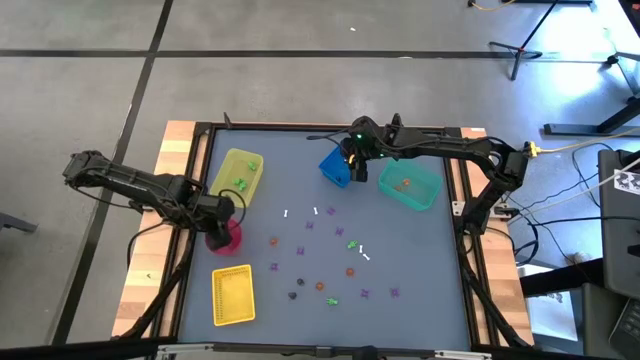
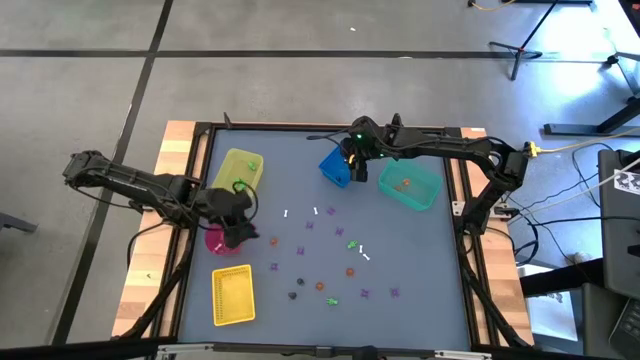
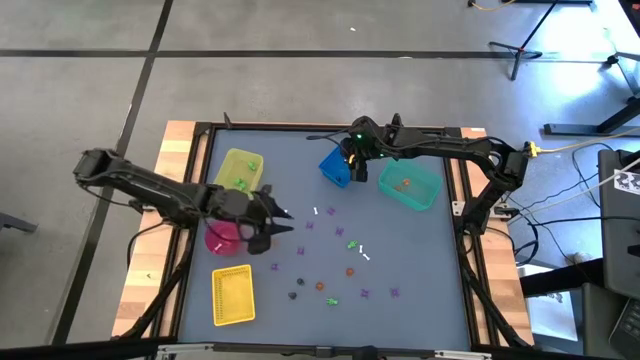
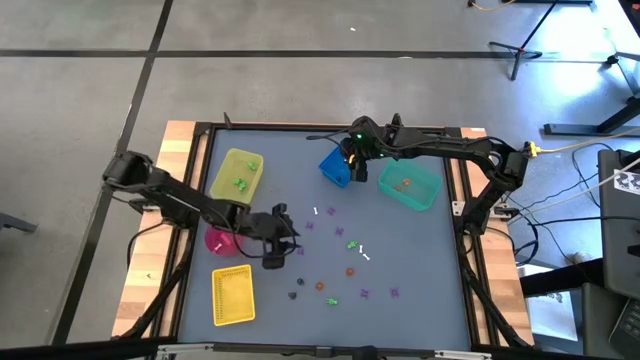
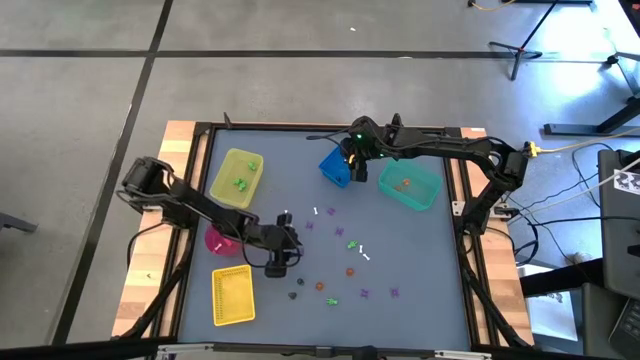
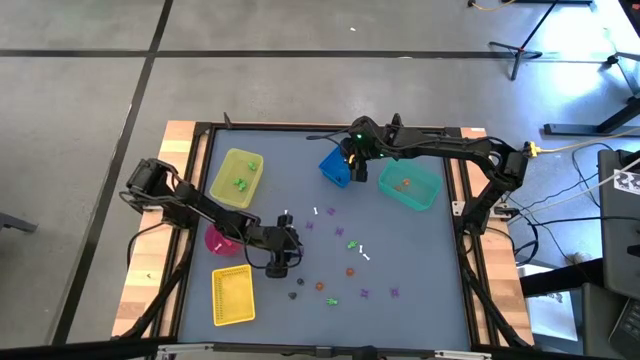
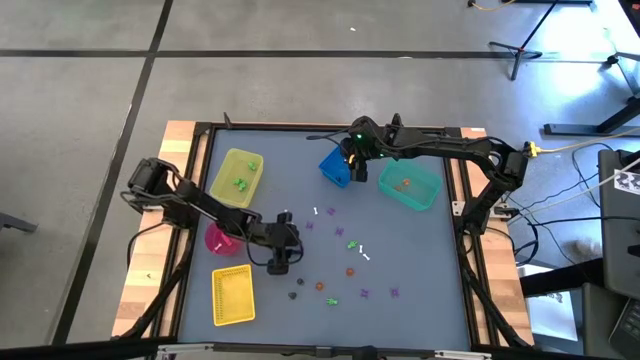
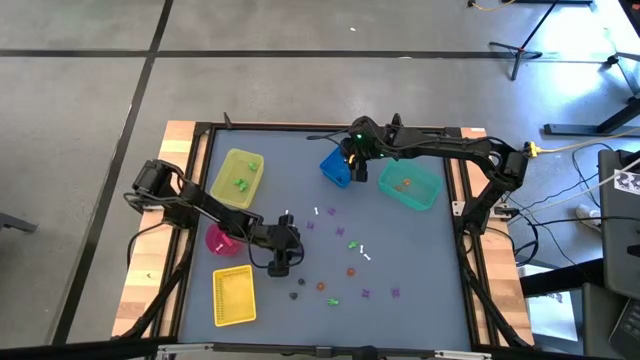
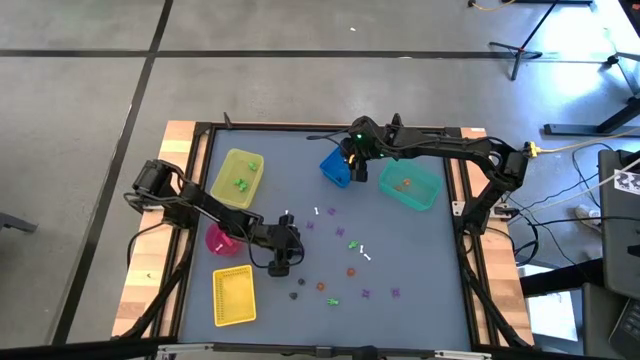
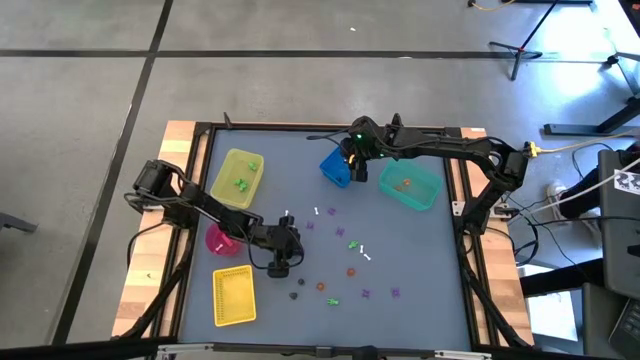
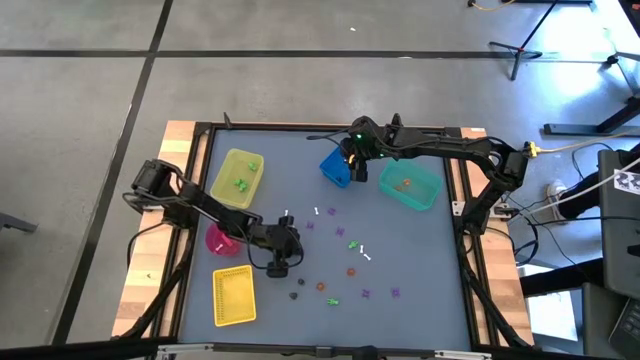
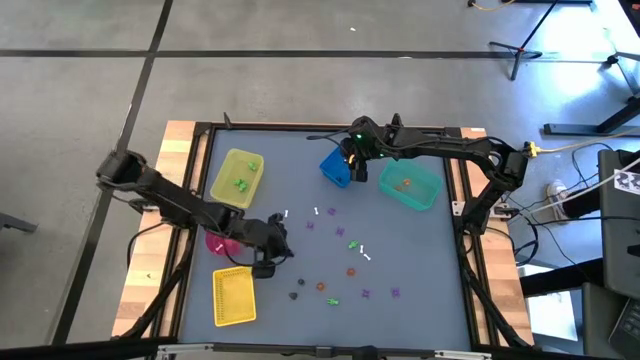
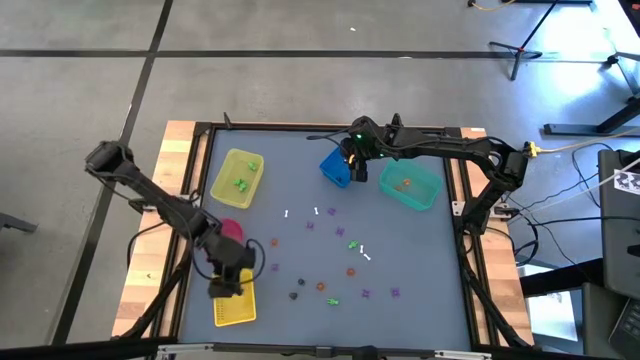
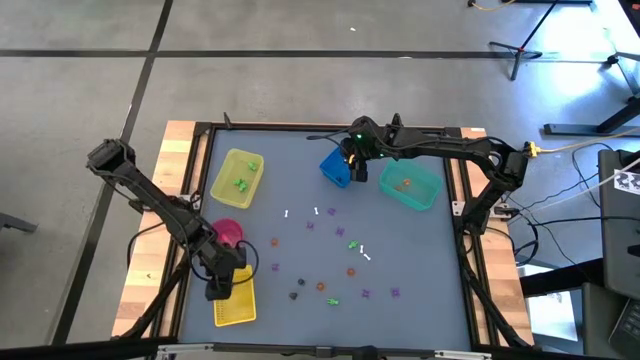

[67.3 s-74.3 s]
Task: Sort Halloween decoration
Put the purple spider toy into the yellow basket

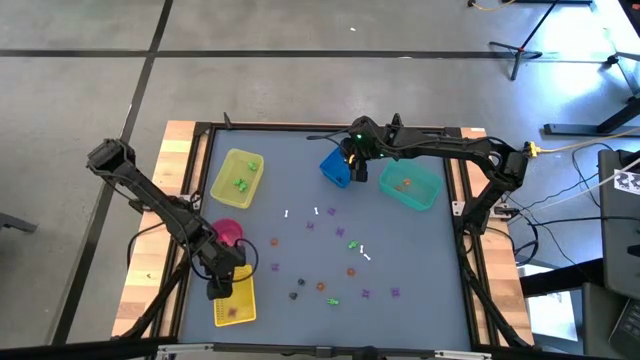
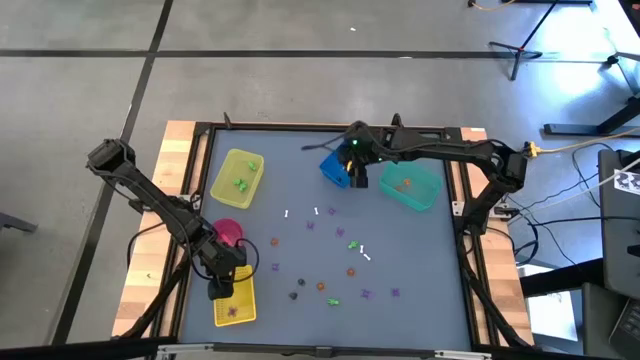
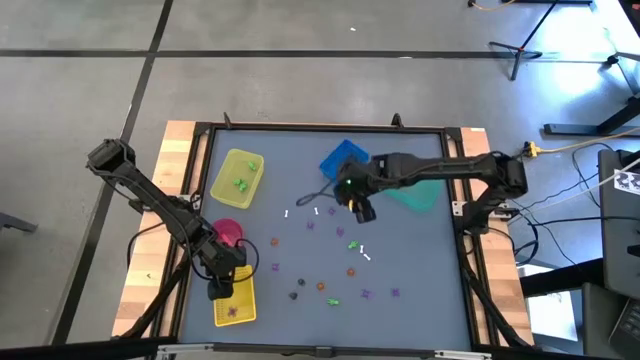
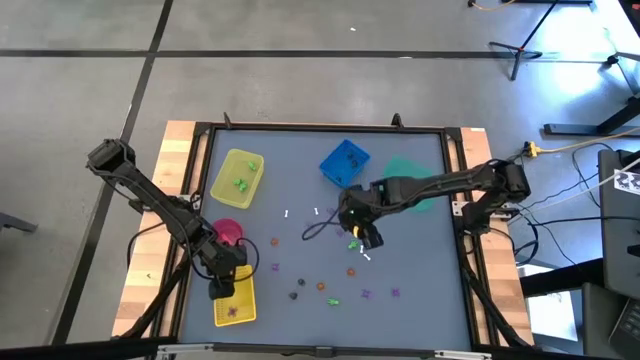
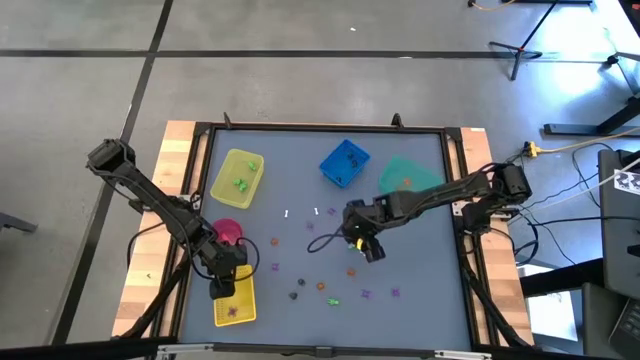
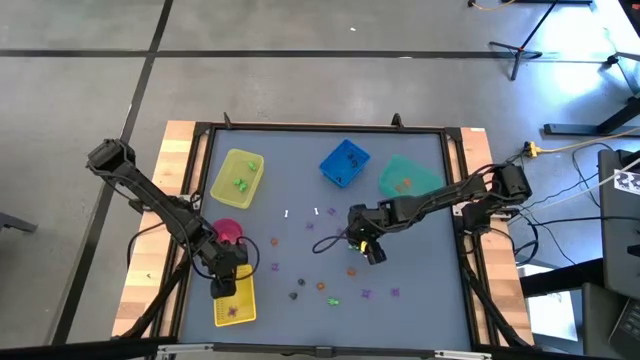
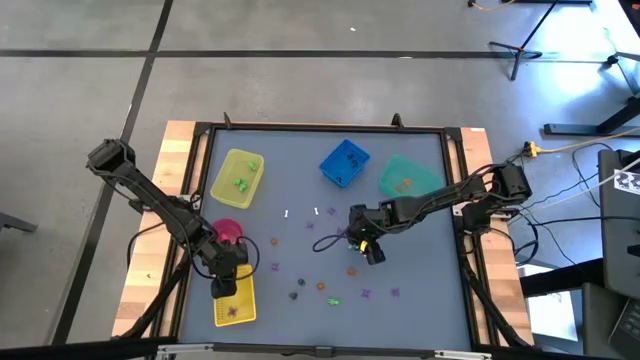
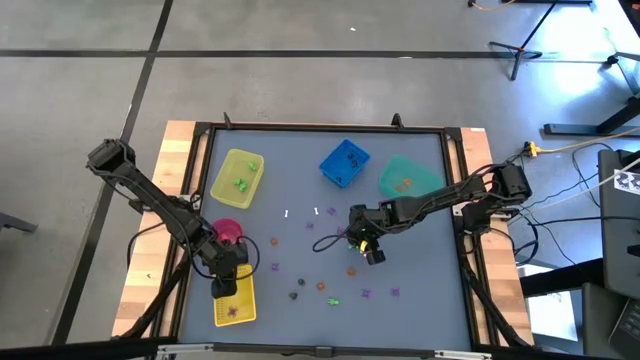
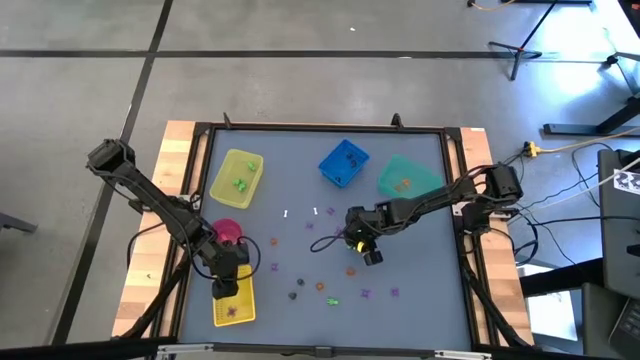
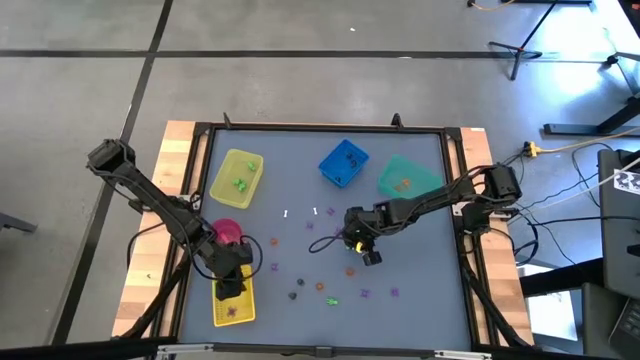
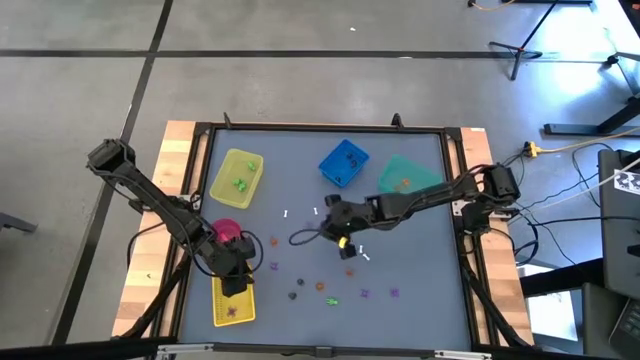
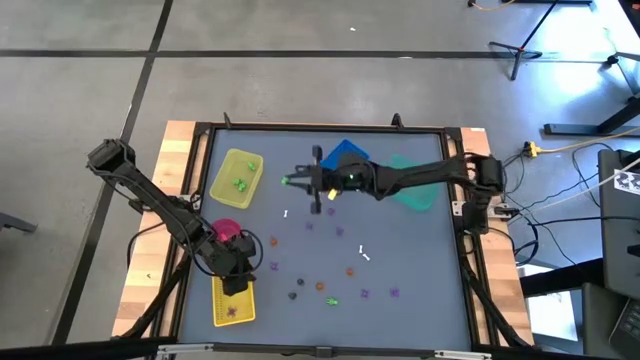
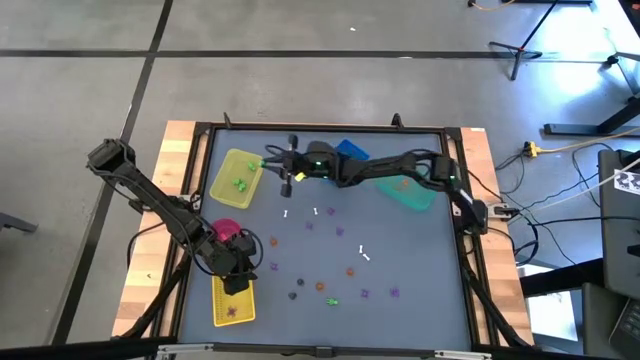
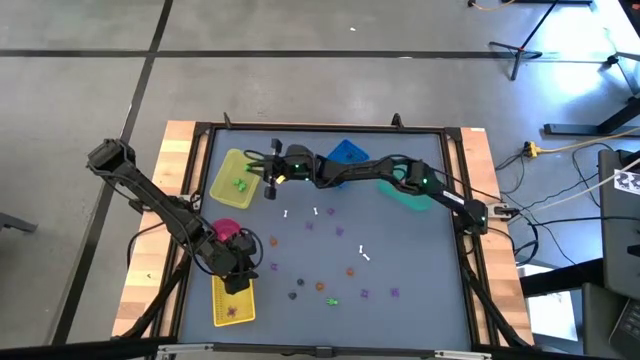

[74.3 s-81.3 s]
Put the green skeleton toy into the yellow bin

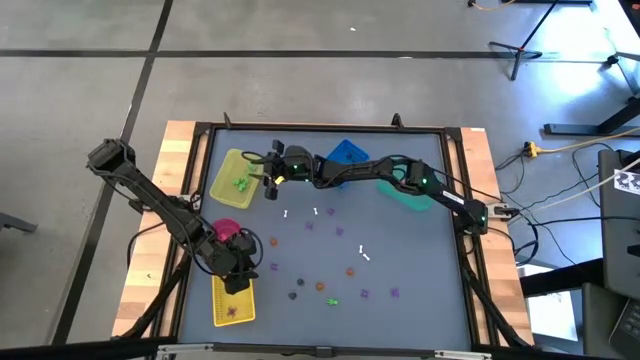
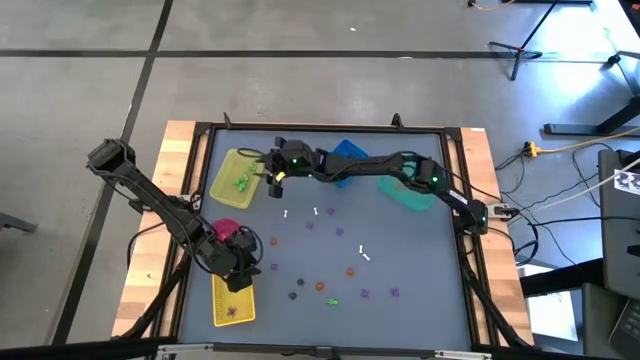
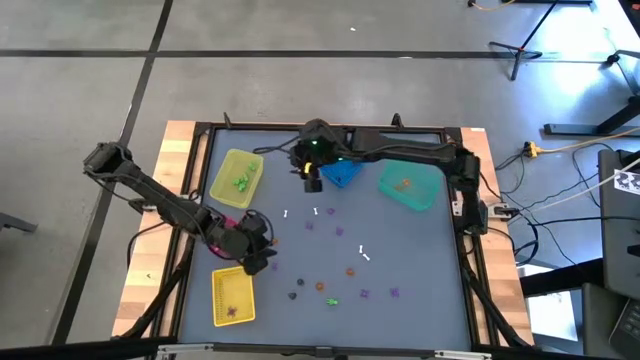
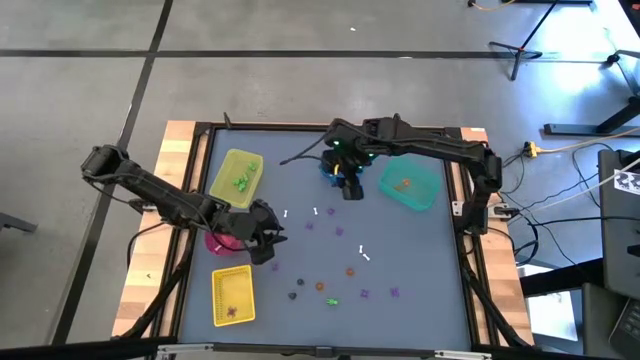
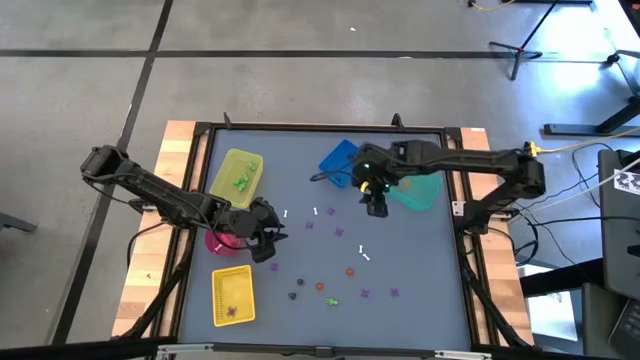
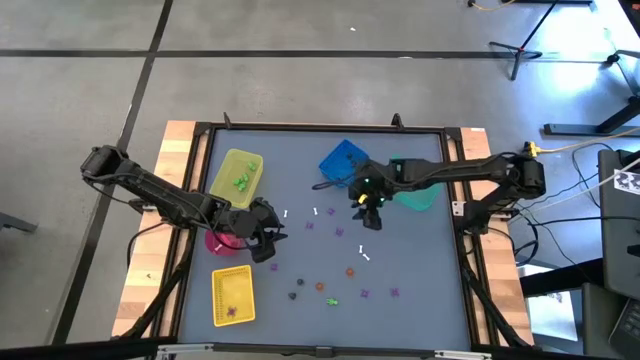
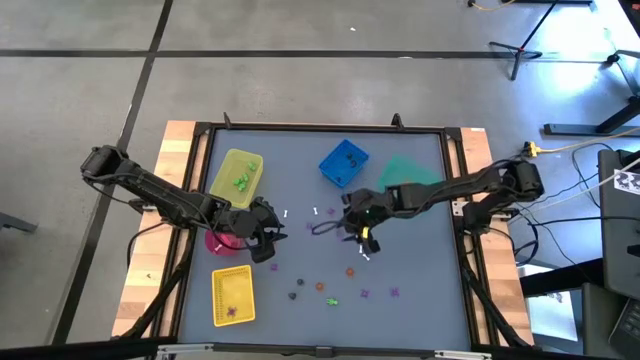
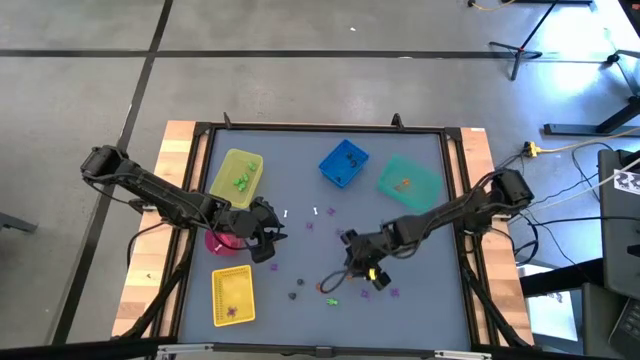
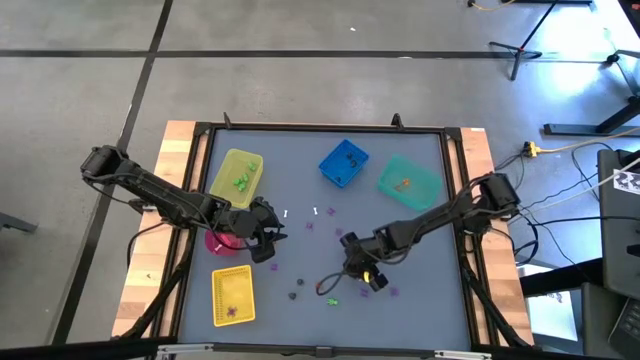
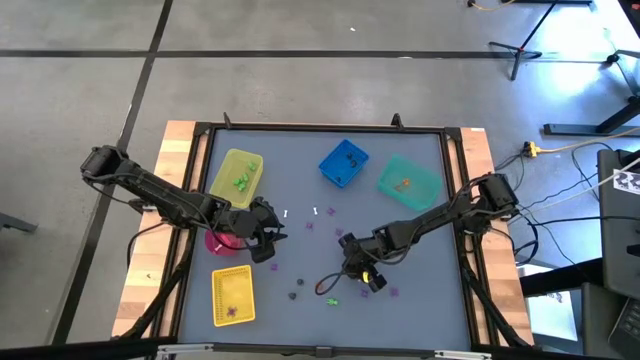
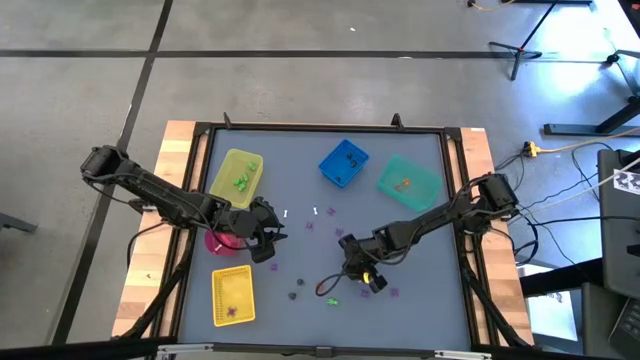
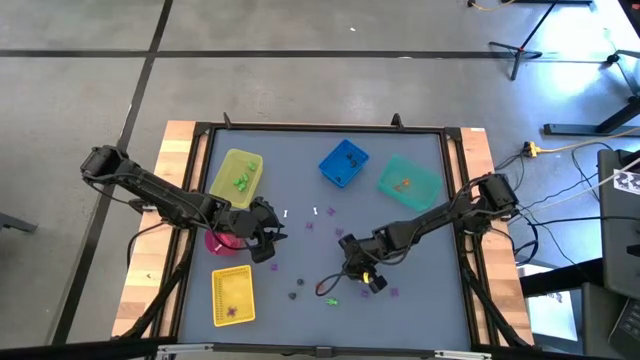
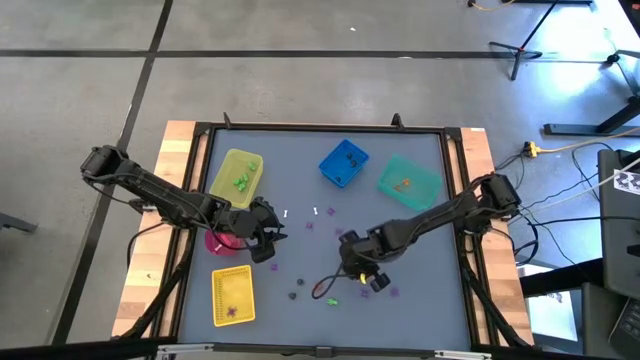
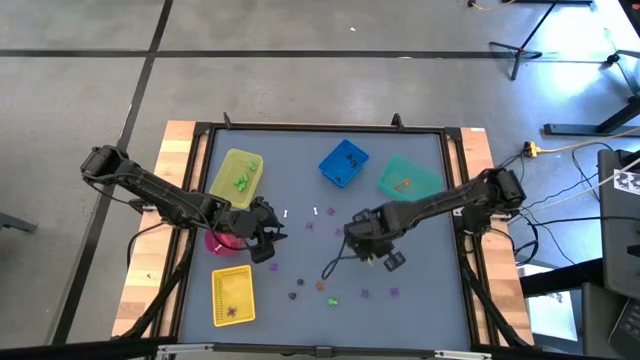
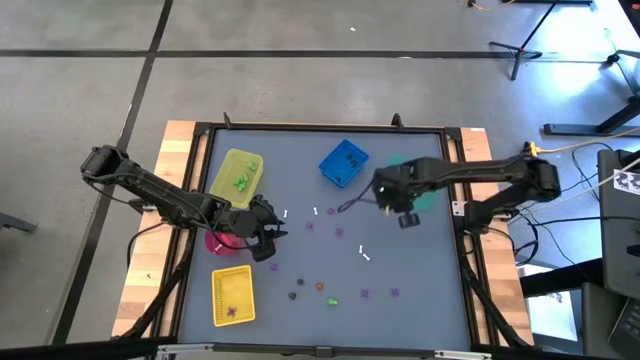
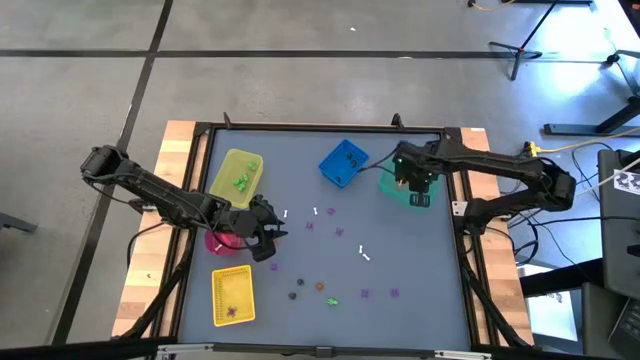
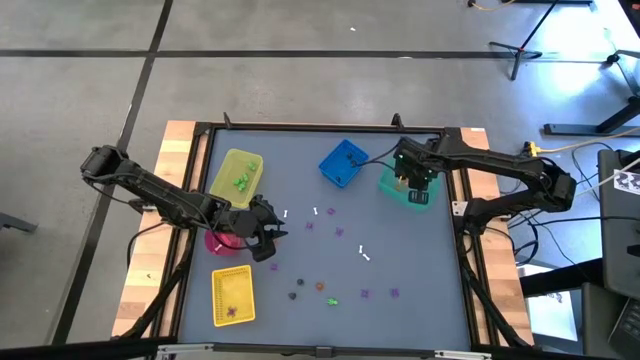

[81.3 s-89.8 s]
Put the orange pumpkin toy into the green bin
